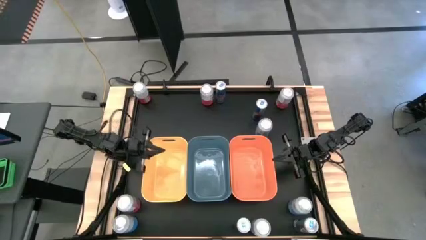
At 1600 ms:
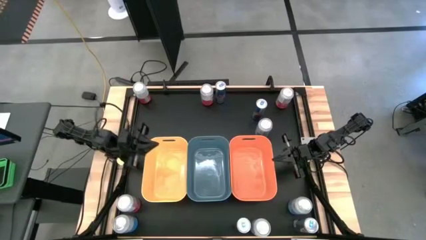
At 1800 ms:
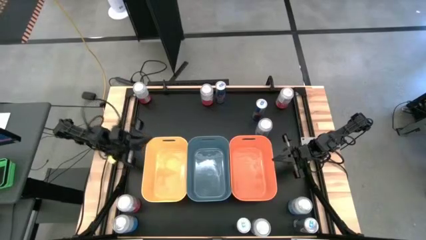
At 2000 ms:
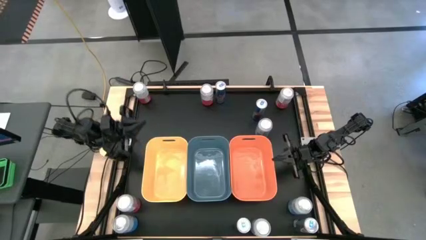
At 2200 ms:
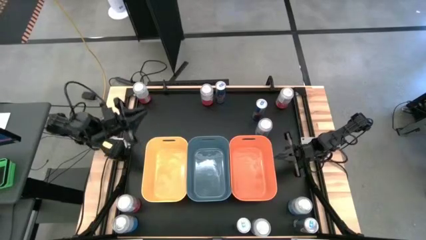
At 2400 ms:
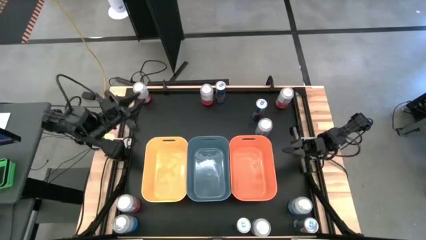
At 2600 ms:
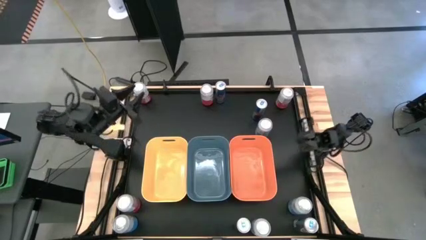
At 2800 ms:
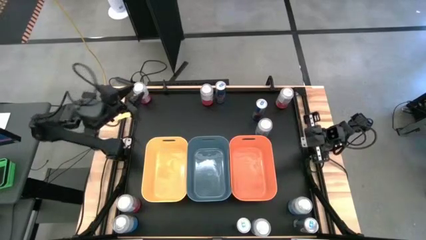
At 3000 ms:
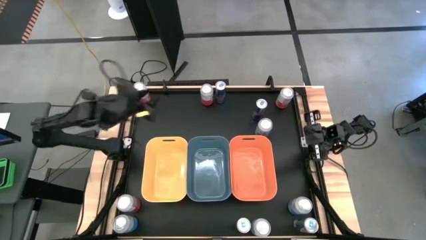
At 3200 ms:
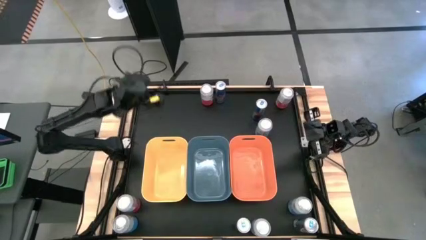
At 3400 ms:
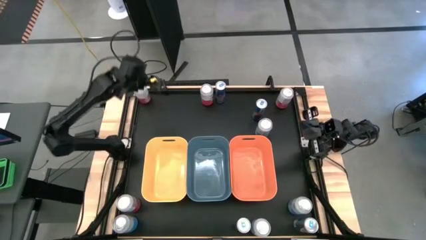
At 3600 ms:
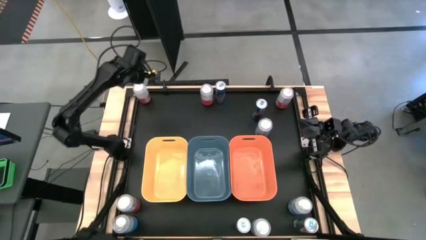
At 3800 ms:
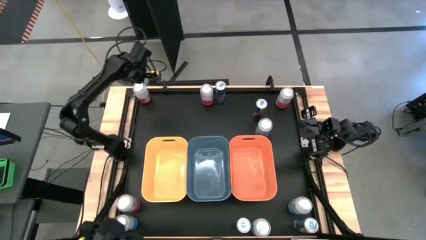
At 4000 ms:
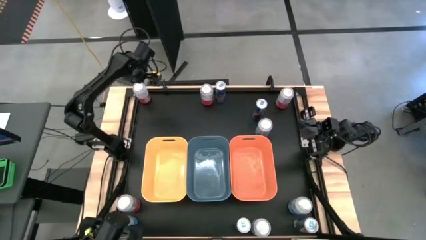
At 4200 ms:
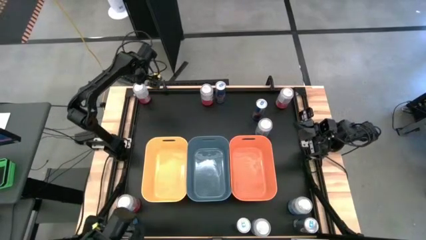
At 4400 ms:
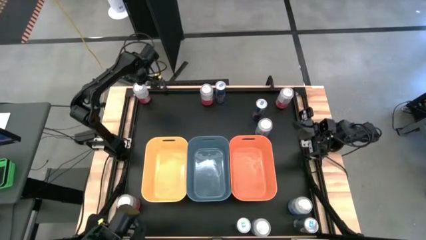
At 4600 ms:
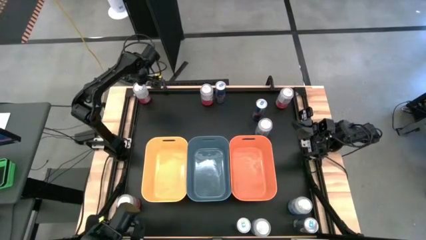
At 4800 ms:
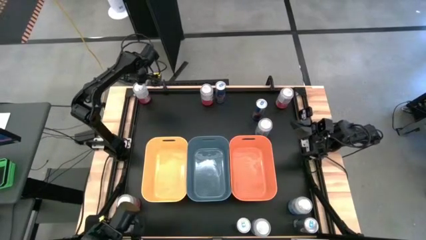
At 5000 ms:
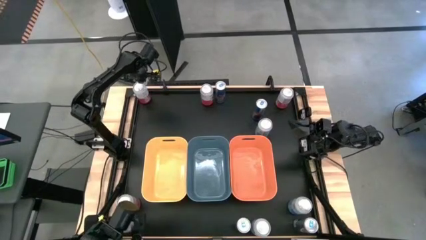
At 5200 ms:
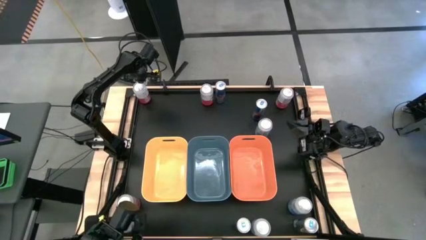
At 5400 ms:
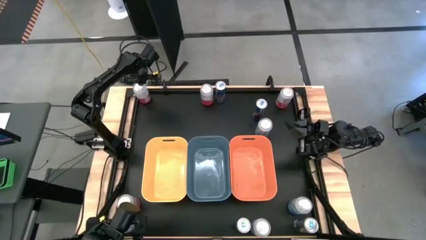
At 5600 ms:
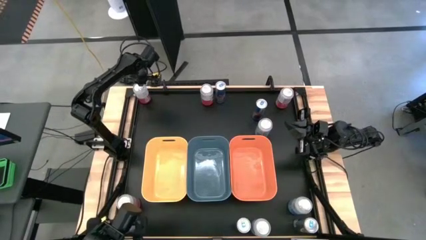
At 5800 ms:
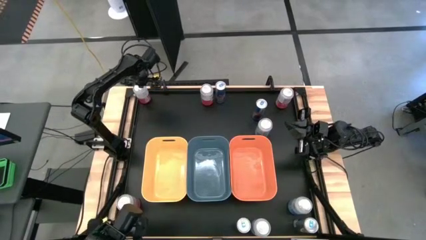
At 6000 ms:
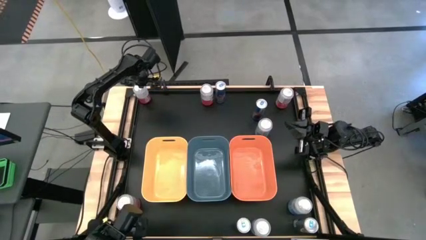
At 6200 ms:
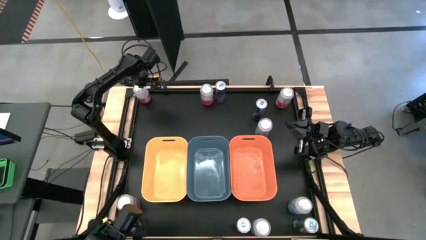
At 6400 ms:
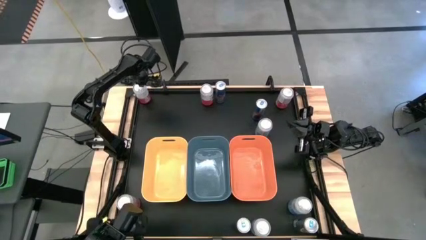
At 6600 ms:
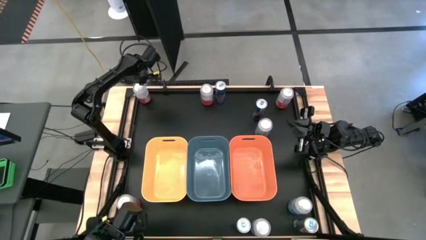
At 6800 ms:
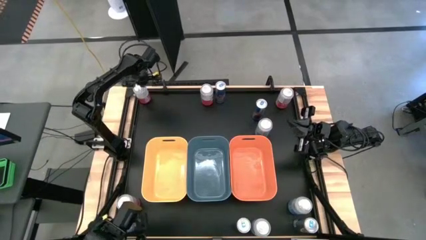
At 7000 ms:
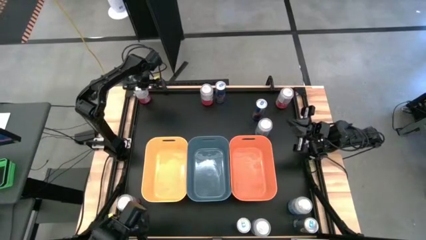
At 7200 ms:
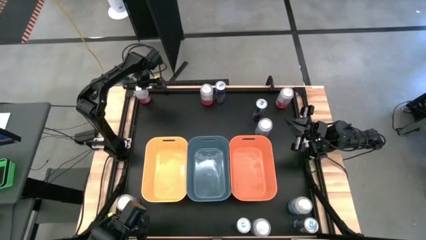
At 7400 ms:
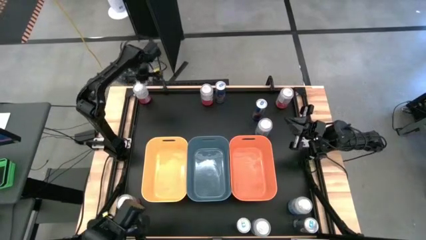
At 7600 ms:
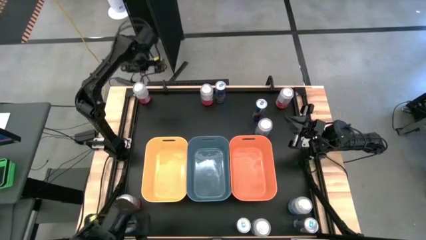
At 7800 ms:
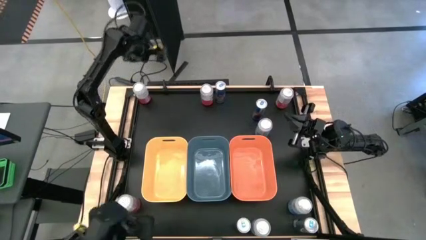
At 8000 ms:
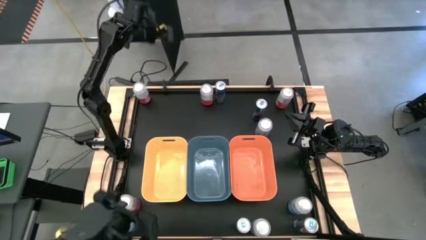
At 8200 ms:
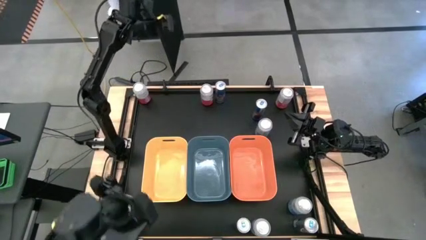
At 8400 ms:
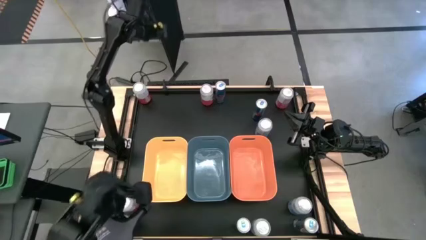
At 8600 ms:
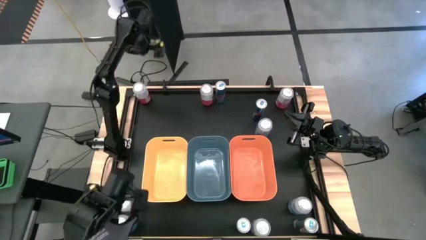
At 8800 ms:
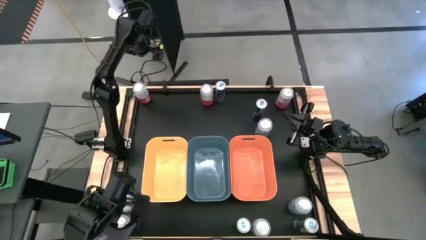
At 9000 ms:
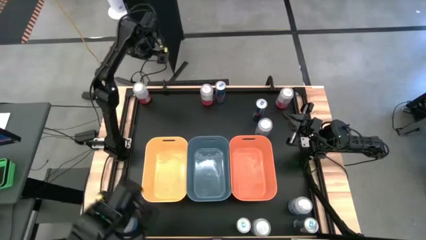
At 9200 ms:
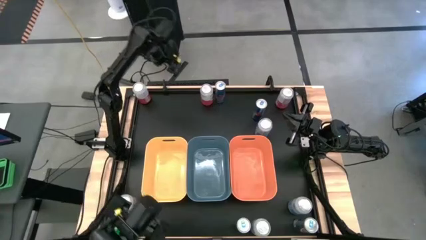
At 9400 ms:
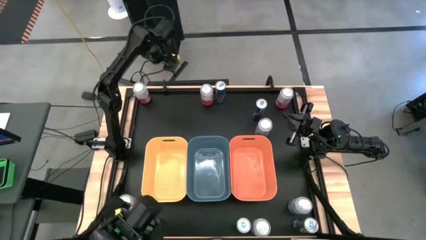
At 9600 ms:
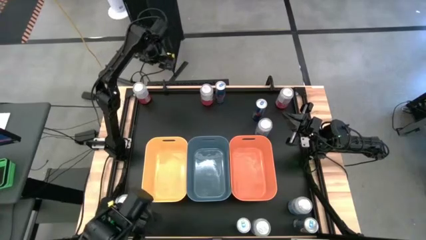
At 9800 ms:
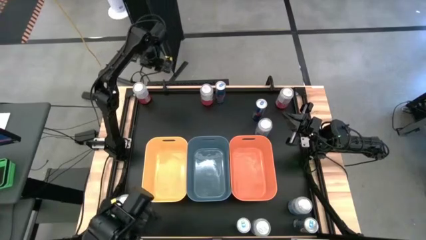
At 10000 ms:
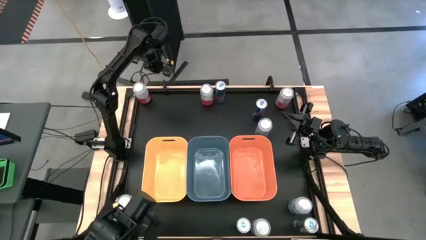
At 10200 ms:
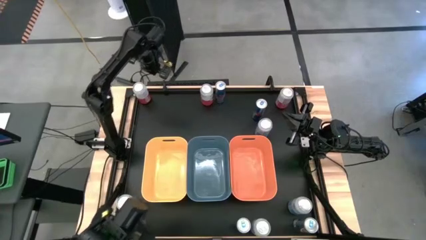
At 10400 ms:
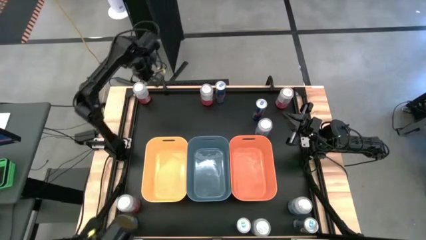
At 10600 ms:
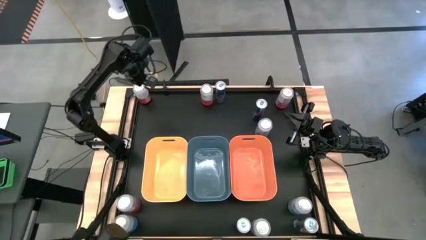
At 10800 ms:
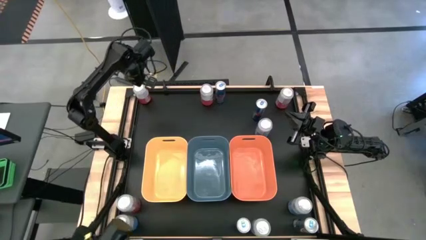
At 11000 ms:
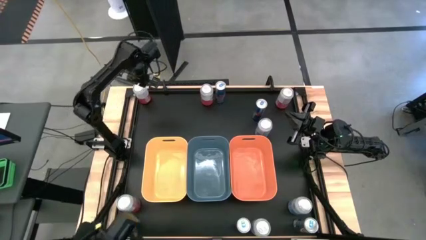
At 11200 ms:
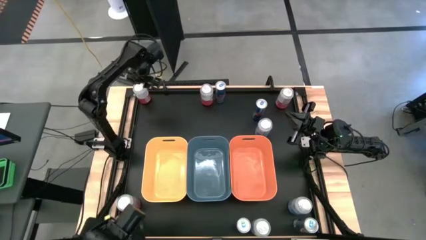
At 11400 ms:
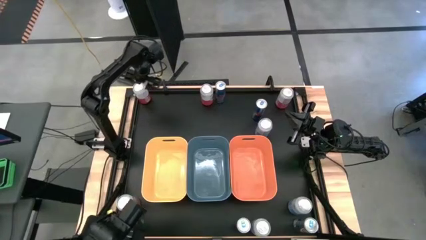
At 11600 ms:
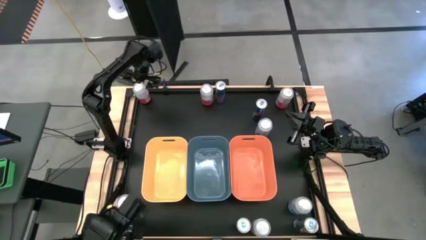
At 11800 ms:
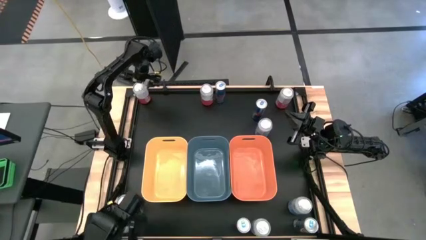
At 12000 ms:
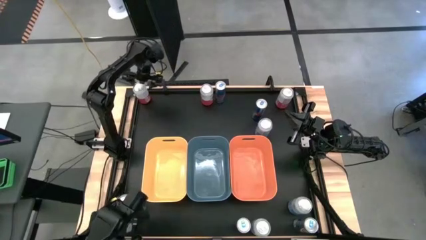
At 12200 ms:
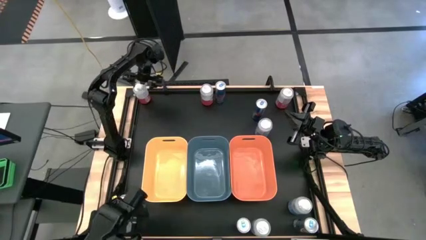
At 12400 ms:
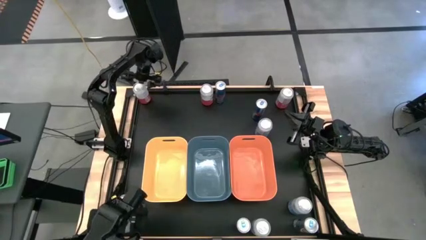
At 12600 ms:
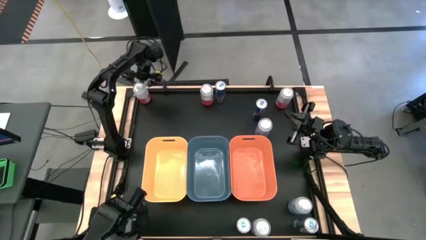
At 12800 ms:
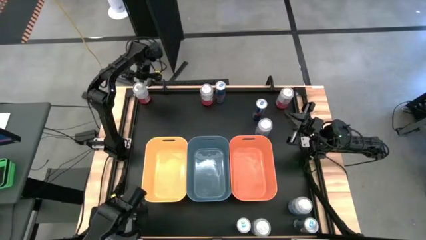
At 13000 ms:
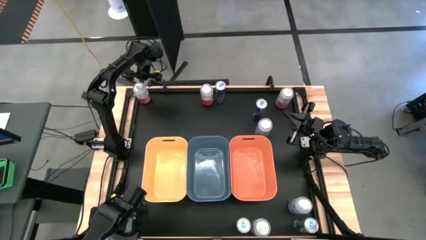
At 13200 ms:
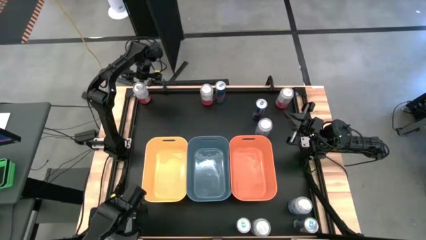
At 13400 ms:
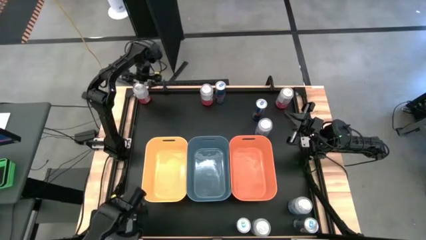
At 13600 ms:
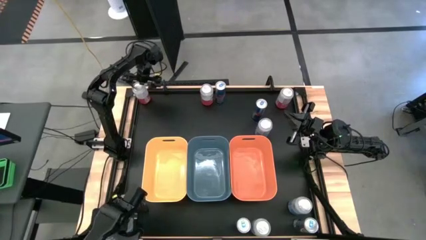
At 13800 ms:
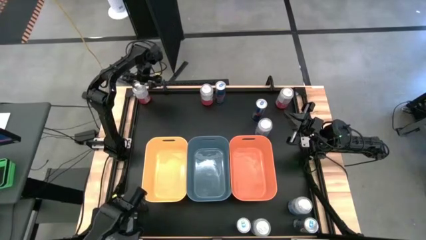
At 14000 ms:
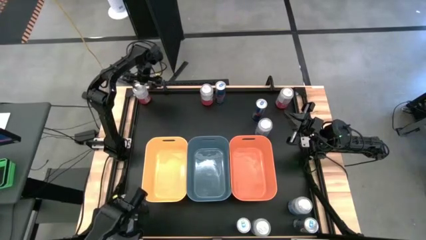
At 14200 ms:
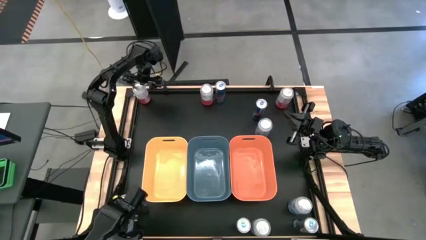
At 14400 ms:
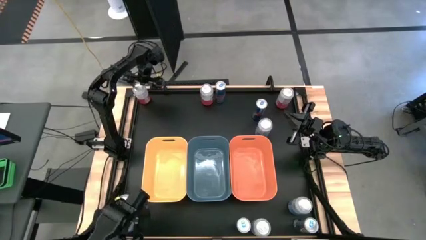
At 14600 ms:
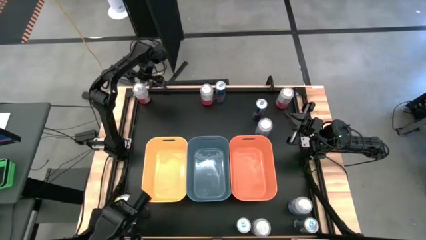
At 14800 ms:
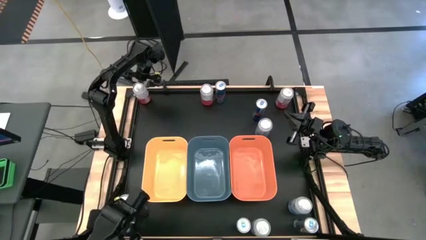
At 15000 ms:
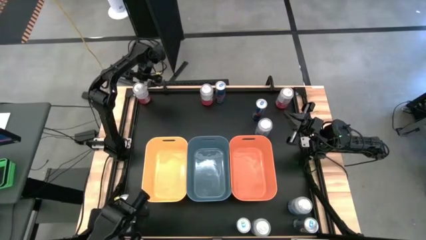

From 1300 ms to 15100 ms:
Task: Sort soda cans
Put the top left pink-white soda can into the yellow bin
